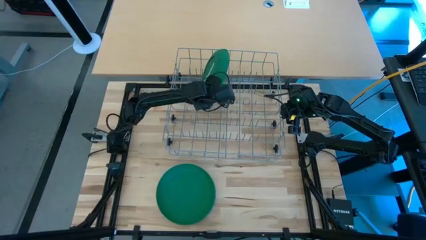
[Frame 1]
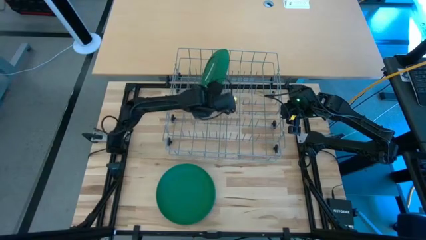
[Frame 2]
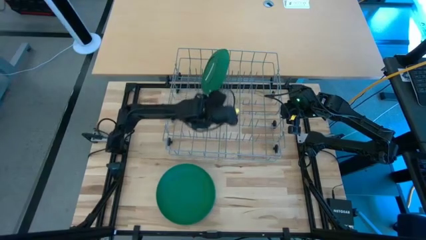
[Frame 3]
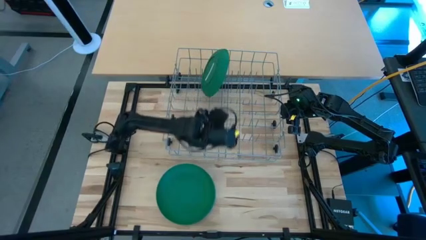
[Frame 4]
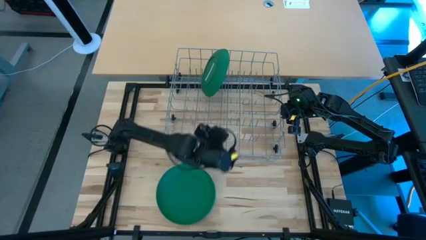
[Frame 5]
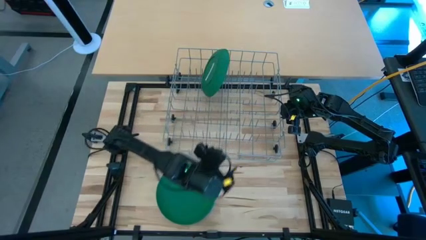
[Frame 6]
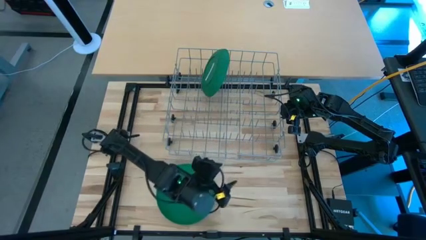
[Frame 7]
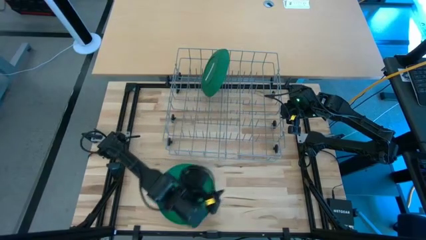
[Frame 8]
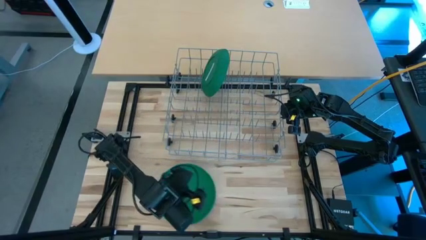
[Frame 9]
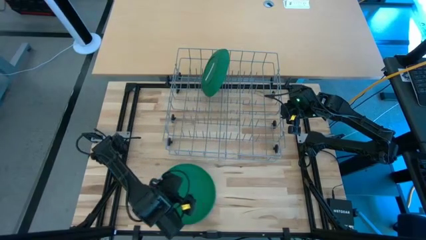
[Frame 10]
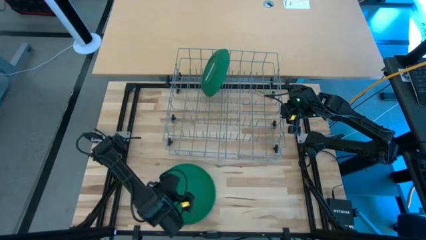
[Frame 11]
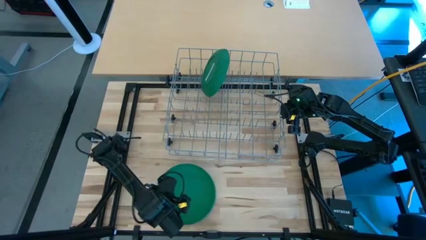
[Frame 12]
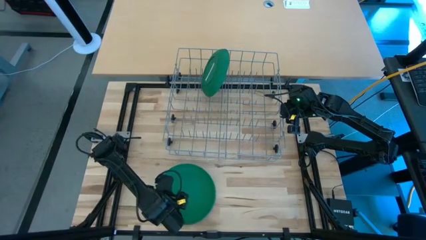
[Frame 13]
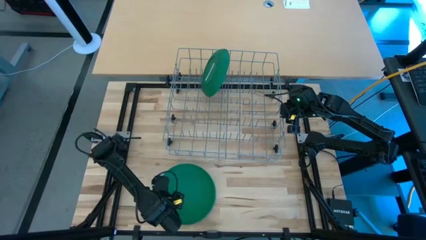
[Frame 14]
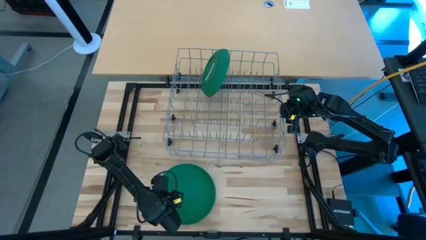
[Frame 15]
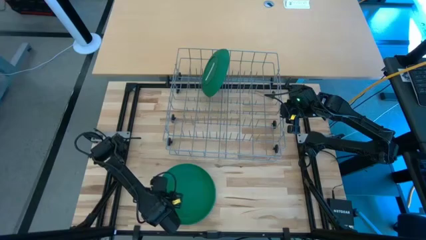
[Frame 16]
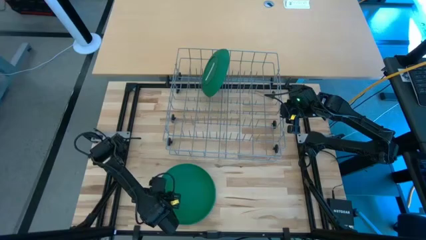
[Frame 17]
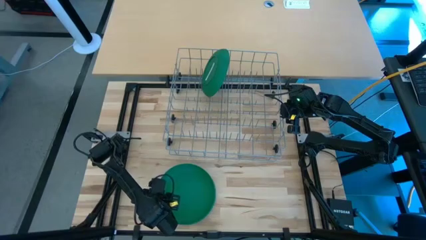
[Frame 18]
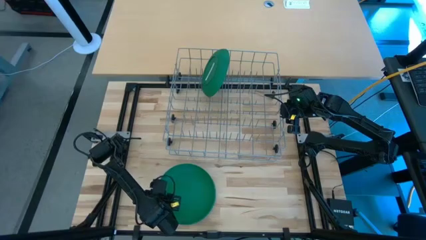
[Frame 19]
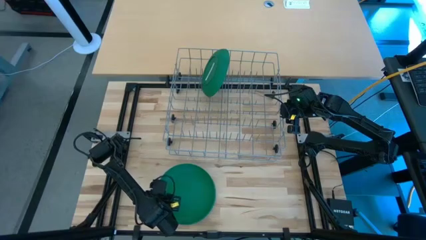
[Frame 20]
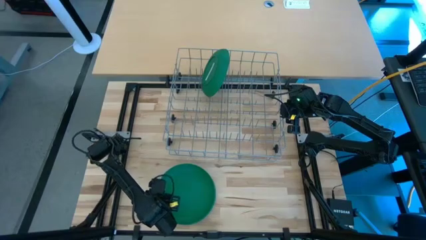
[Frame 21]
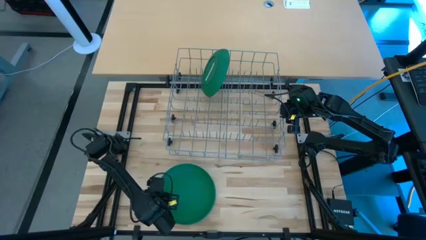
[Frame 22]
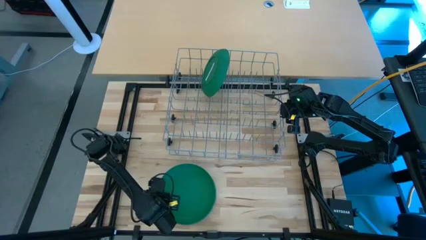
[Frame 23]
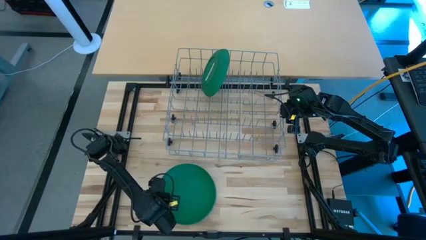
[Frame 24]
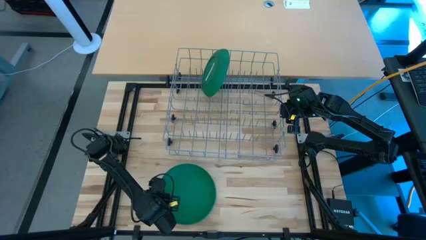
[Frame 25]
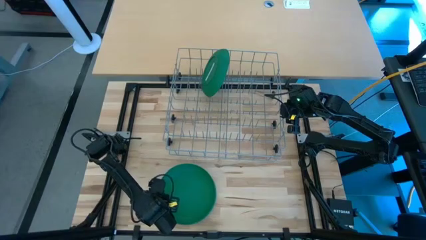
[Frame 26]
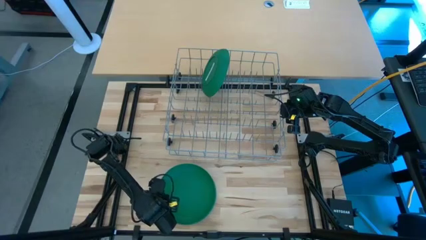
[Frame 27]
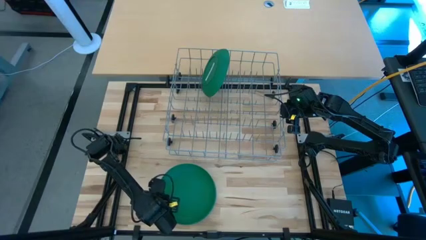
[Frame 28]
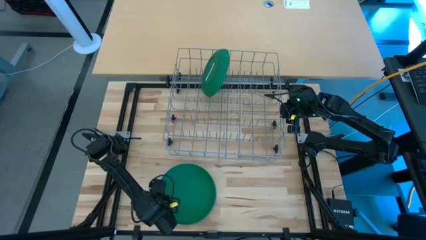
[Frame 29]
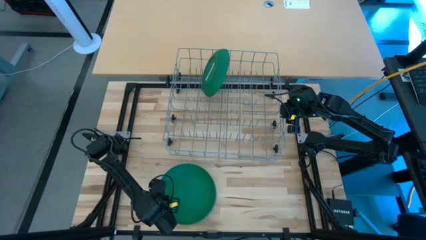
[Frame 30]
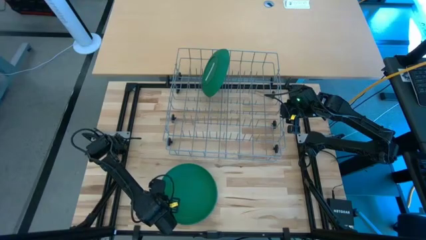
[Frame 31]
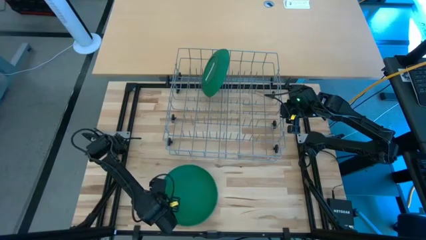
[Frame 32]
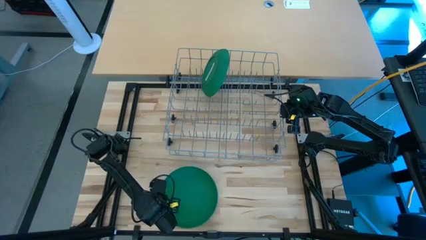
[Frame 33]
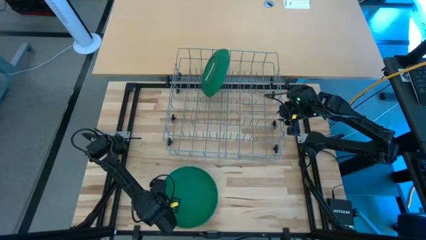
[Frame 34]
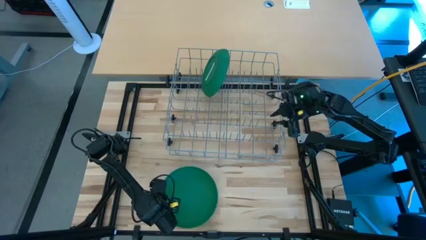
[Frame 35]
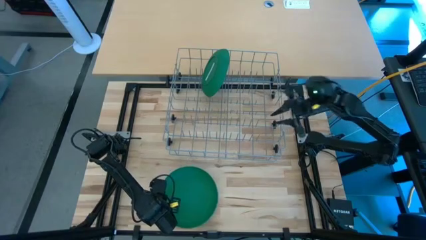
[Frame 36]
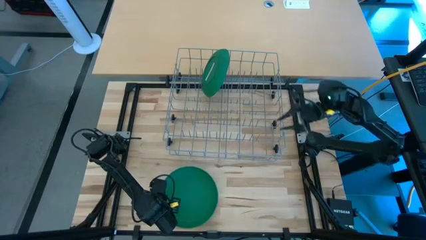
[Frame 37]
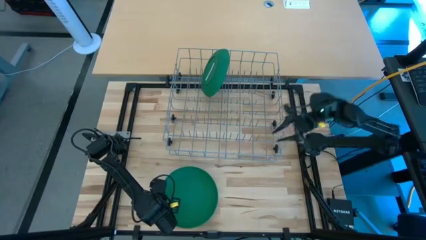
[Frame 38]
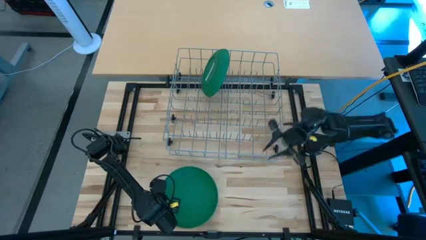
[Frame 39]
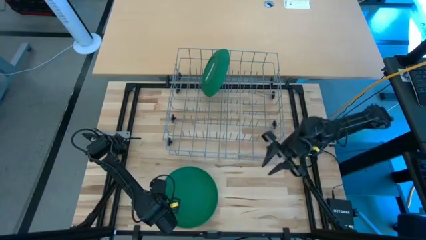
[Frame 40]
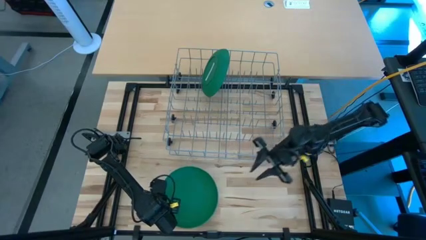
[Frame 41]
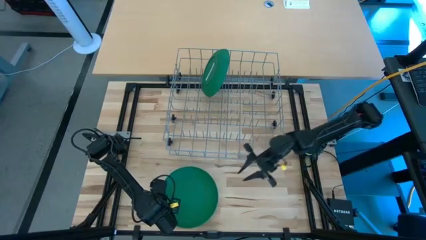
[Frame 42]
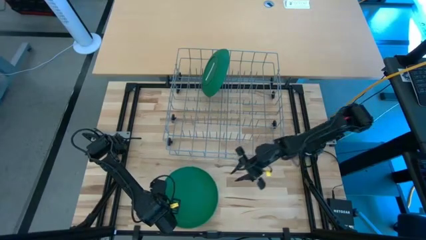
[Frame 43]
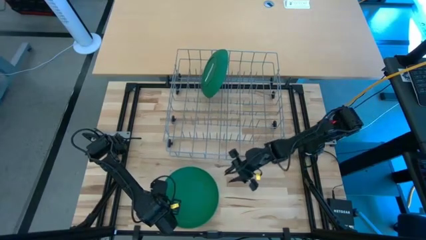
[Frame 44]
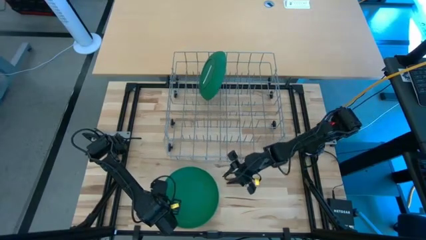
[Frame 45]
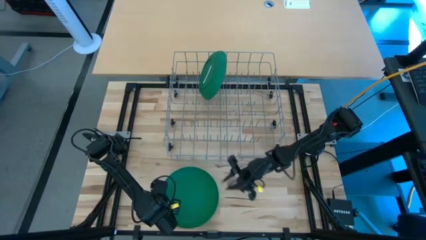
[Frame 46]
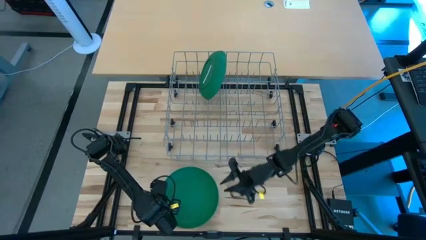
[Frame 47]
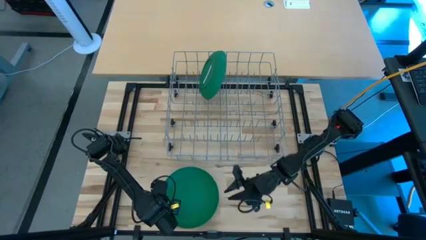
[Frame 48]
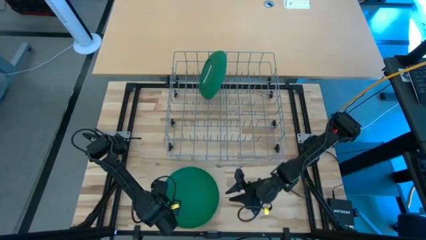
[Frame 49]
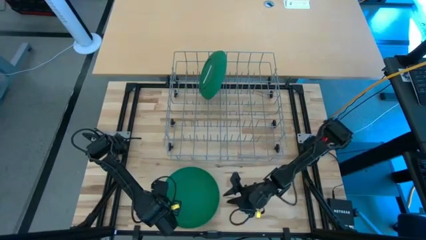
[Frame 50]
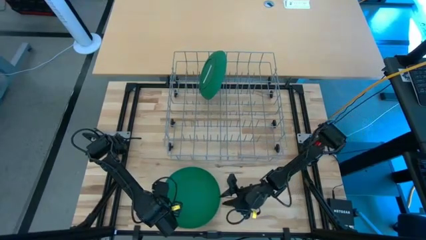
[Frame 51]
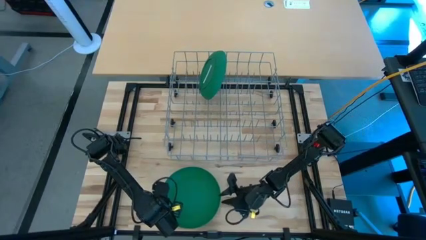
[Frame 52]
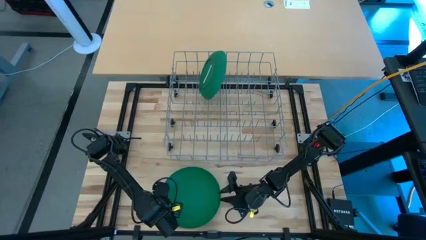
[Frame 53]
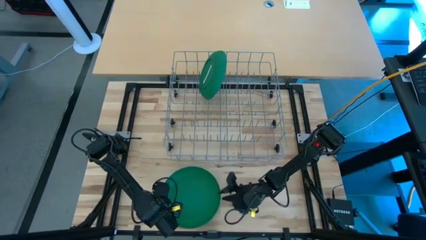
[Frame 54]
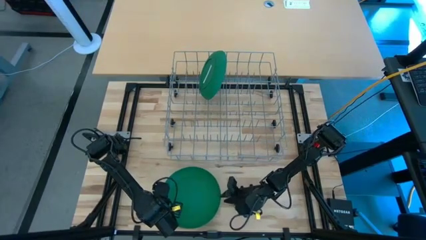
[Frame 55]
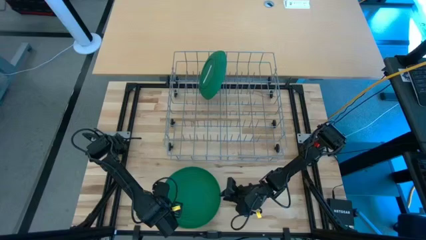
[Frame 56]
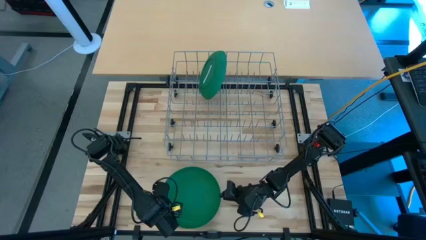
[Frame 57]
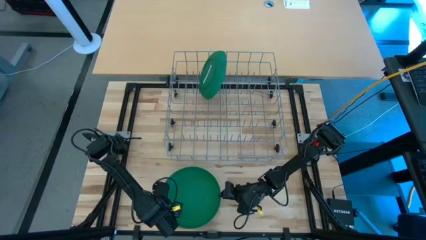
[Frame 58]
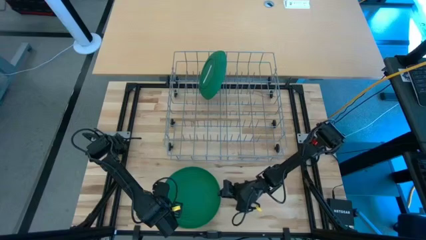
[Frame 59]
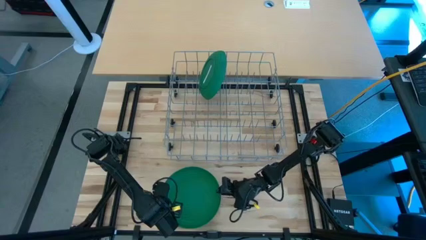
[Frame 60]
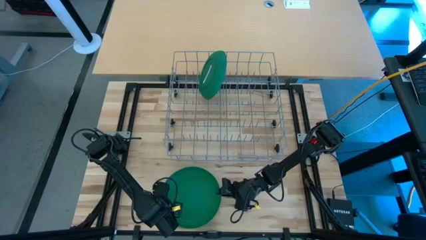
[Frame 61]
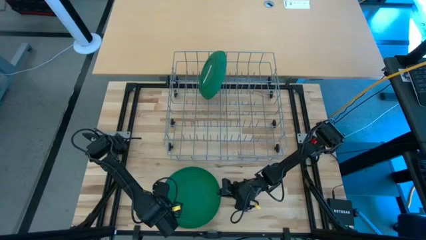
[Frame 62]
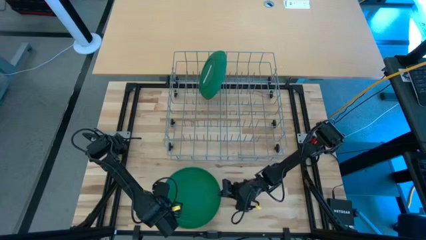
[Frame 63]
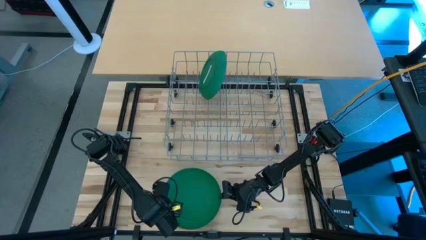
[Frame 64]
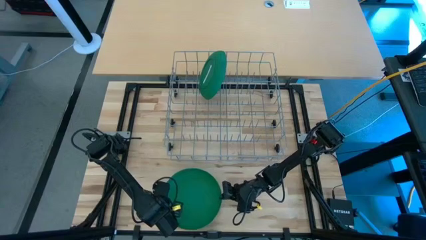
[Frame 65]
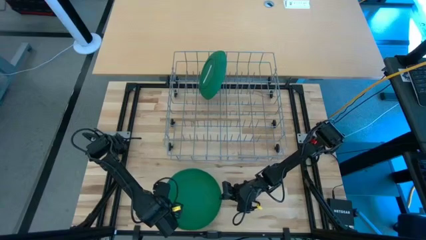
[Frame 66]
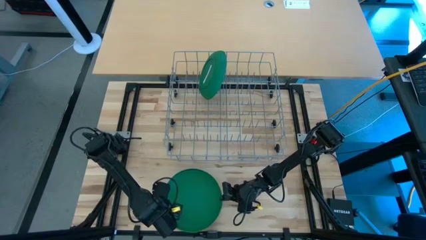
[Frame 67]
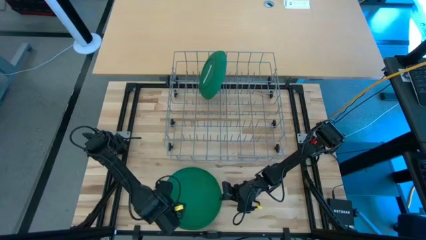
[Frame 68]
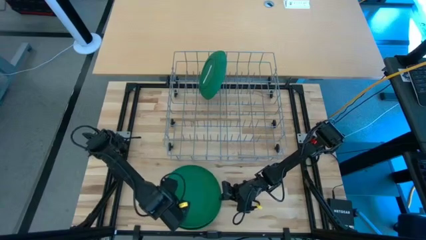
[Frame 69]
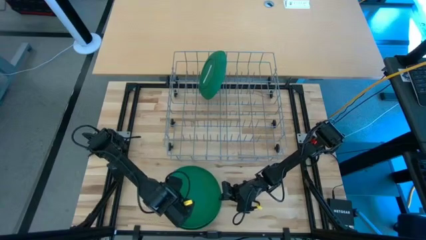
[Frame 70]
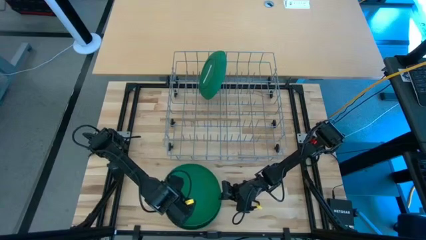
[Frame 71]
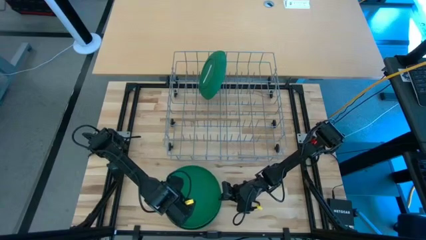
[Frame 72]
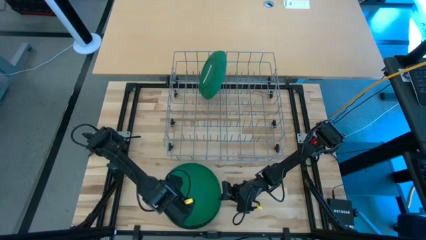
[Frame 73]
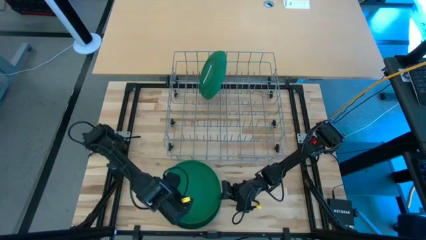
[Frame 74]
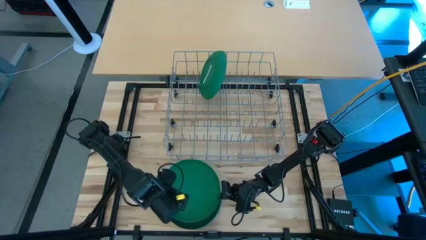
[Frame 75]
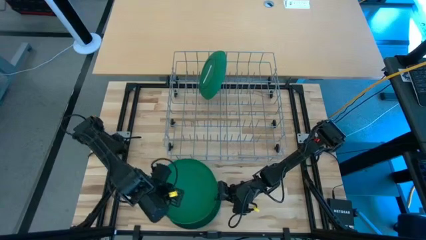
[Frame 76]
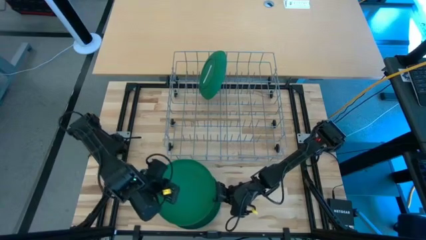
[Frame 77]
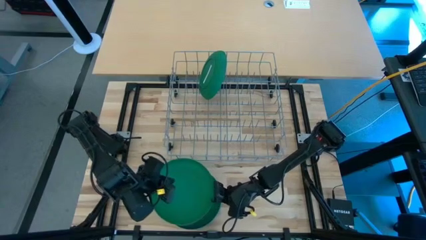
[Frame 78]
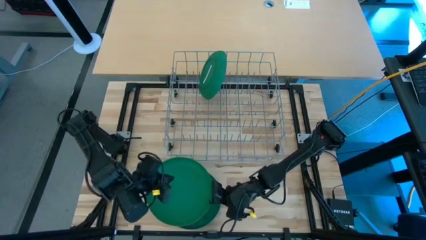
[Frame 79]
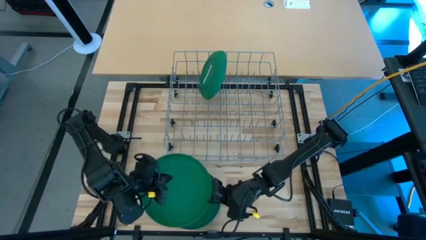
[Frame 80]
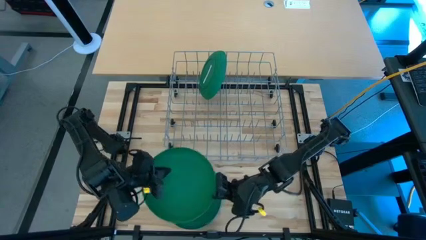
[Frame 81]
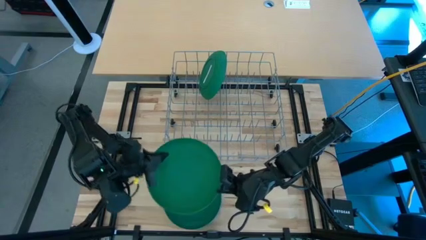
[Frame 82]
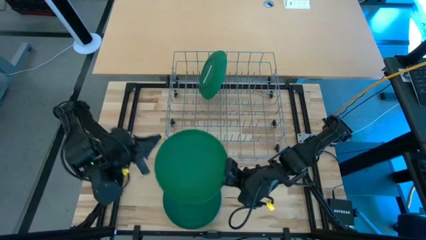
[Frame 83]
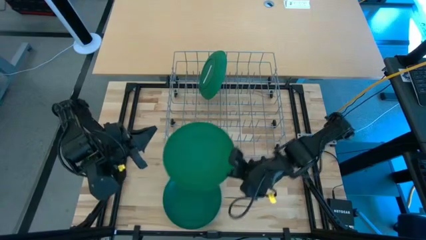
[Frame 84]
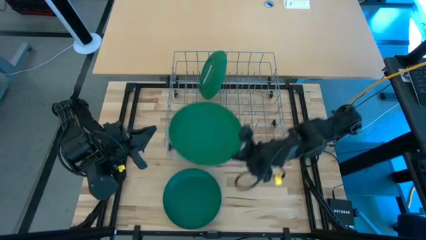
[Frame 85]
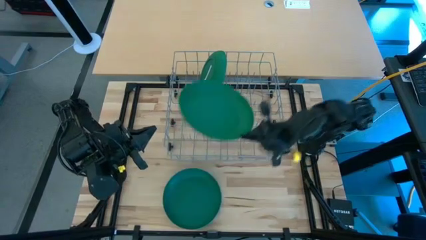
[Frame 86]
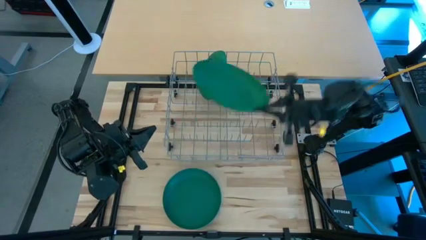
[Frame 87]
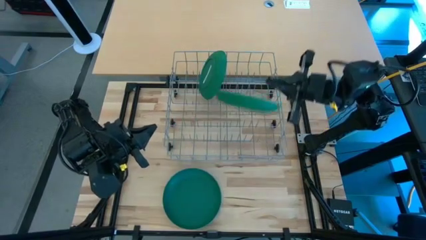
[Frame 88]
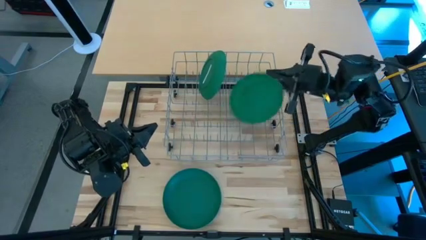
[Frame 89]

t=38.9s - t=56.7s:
Task: Sort dishes
Put the top green plate into the dish rack
